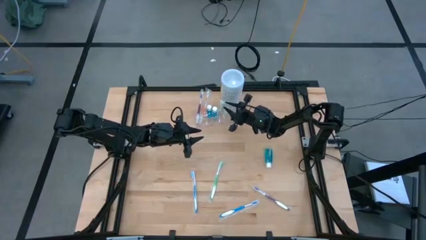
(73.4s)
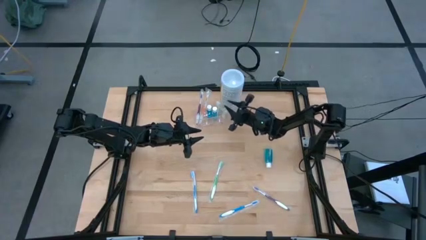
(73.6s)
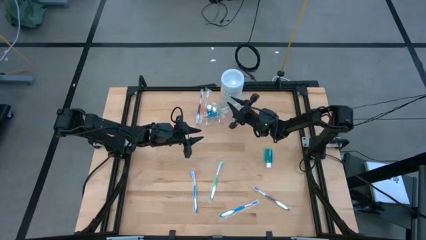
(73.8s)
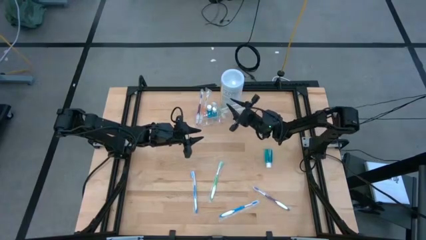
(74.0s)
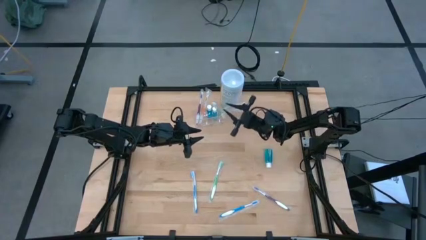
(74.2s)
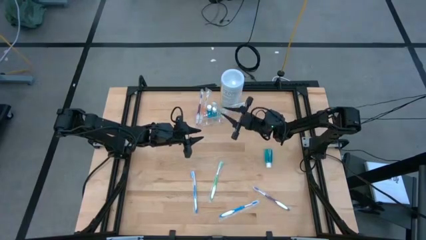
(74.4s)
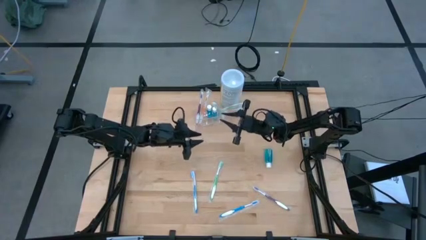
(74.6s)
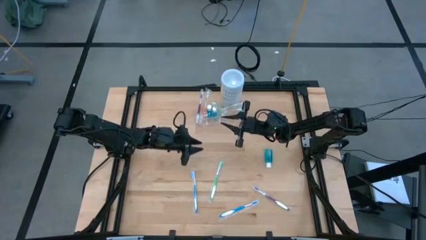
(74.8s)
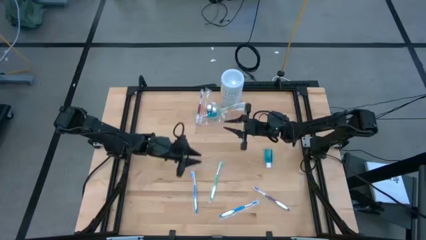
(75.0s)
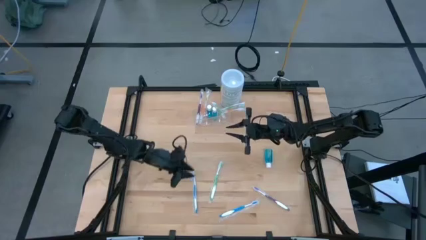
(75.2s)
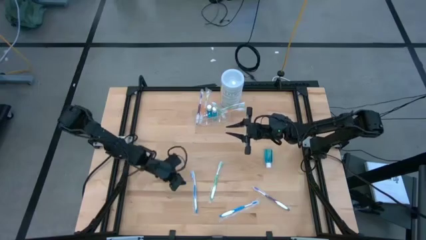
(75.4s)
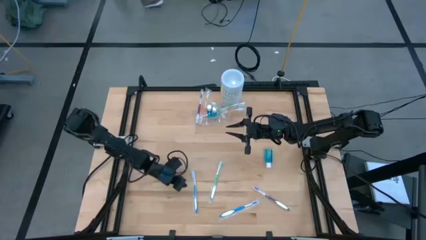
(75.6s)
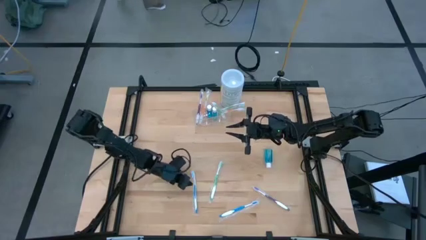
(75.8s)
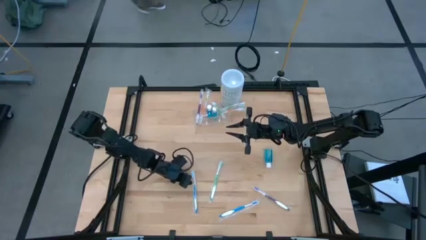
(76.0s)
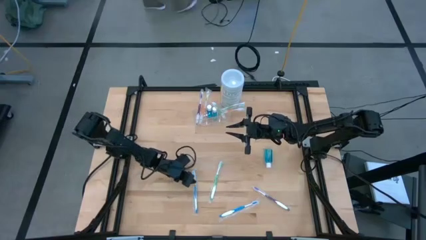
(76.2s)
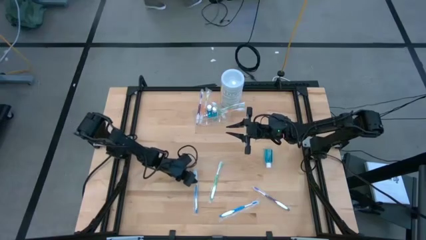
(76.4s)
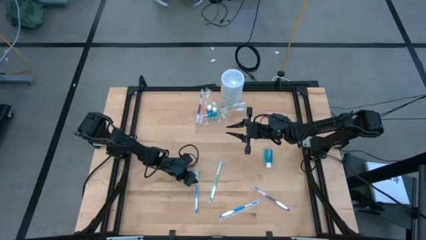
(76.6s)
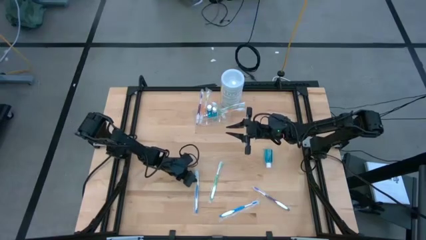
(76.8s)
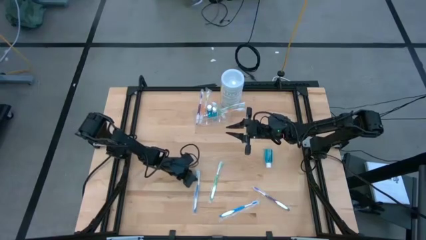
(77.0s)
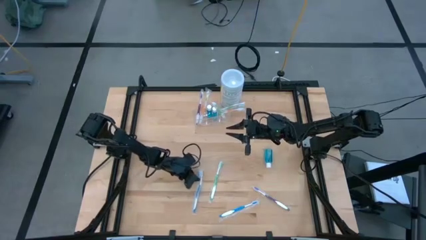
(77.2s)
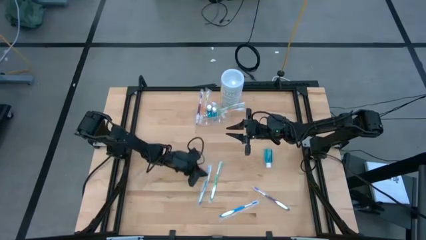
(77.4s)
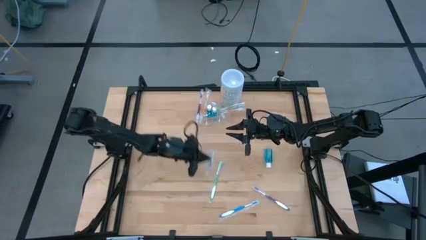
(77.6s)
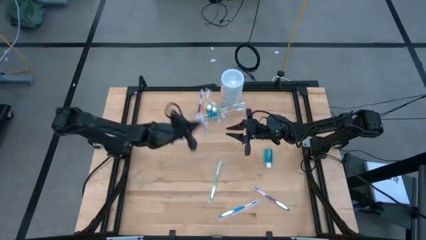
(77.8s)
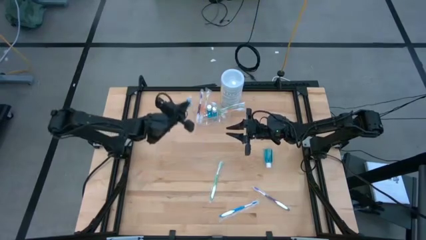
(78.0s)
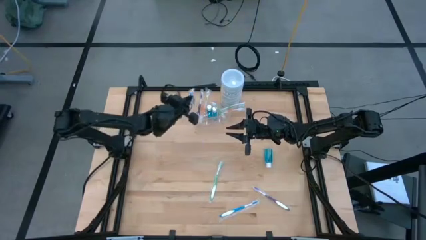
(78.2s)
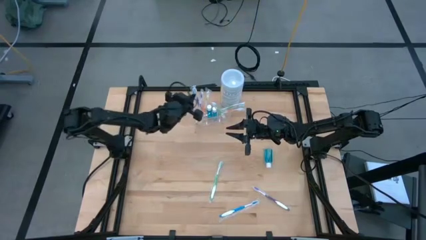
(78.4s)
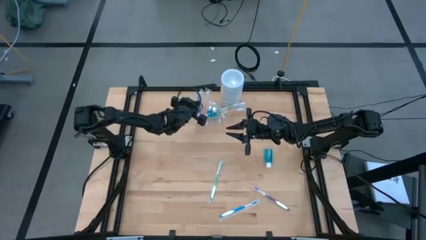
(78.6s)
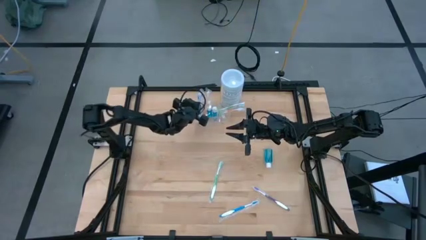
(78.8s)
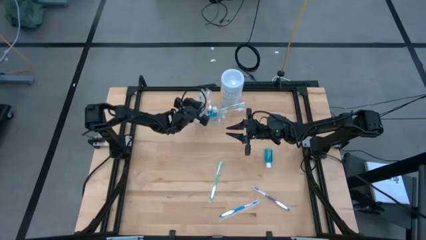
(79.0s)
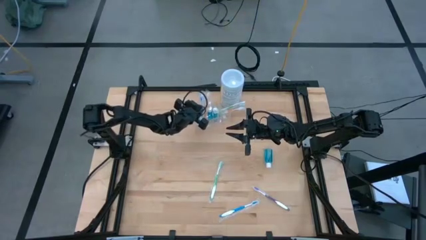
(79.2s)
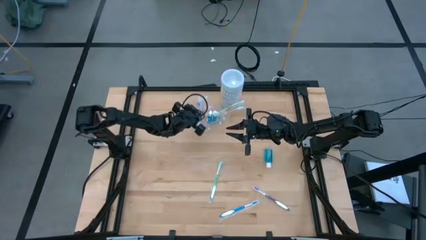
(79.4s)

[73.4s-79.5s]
Task: Pick & Place toothbrushing station
Put the left blue toothbrush into the transparent organizer

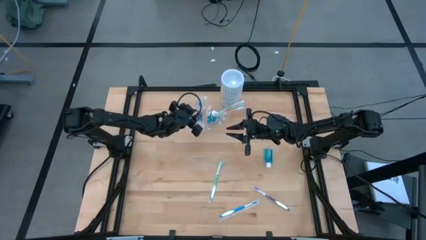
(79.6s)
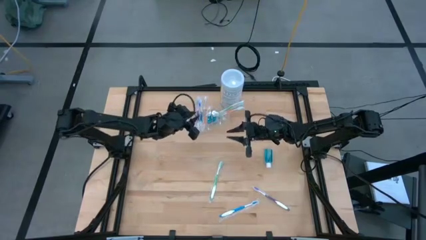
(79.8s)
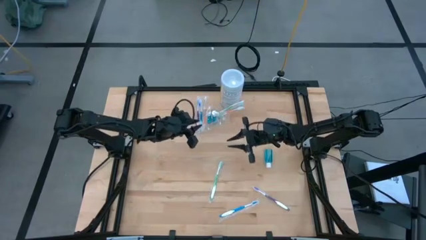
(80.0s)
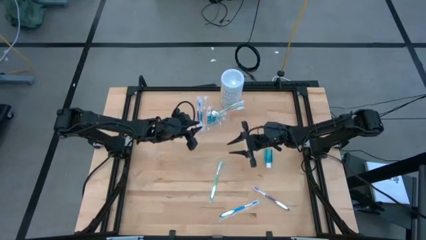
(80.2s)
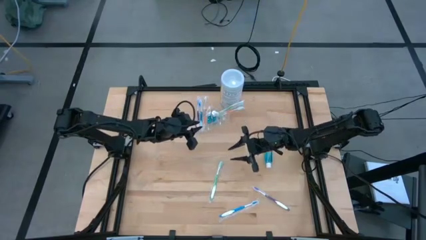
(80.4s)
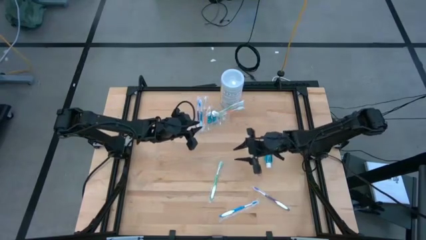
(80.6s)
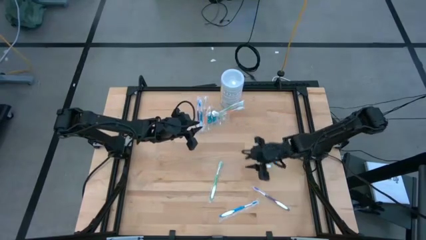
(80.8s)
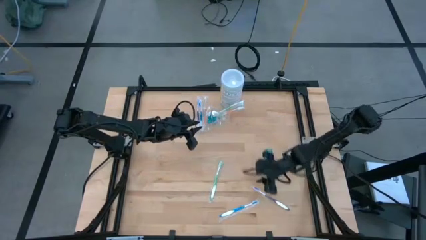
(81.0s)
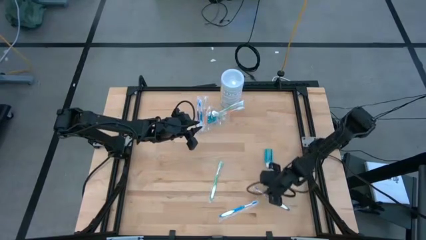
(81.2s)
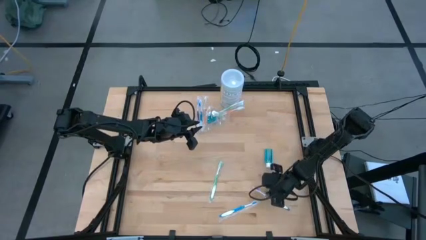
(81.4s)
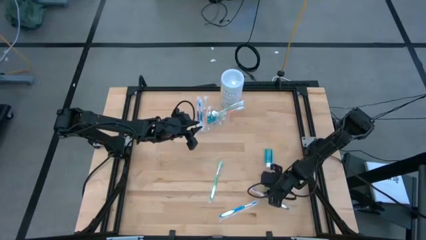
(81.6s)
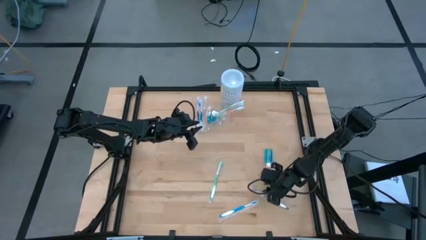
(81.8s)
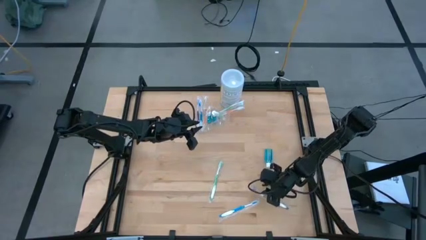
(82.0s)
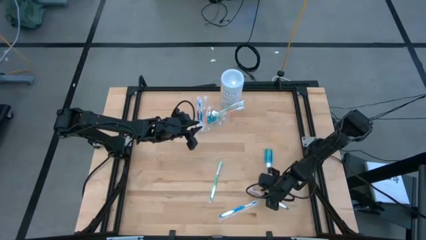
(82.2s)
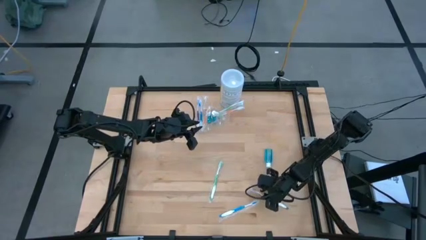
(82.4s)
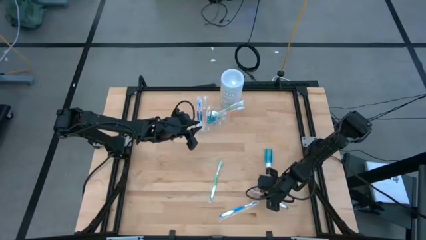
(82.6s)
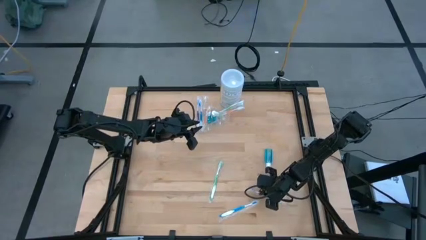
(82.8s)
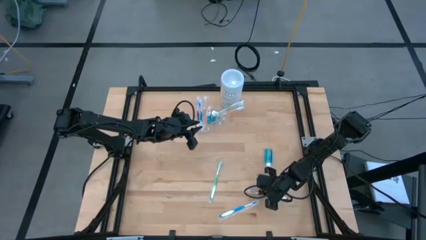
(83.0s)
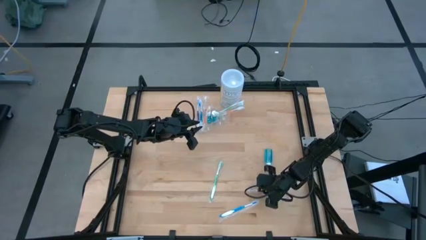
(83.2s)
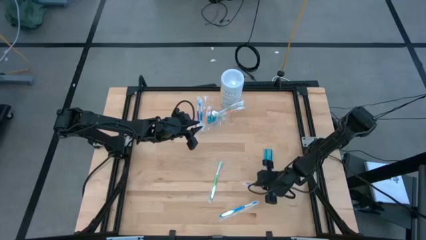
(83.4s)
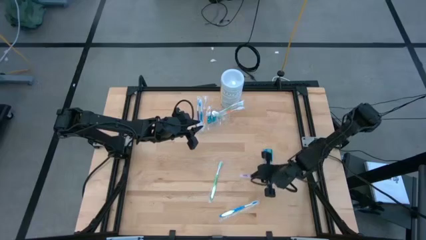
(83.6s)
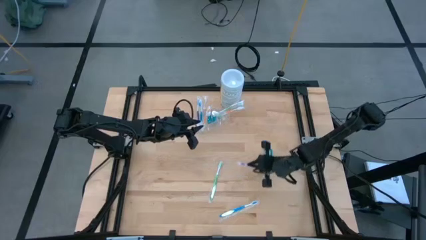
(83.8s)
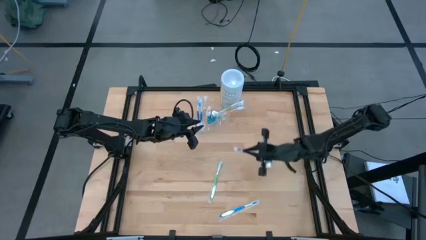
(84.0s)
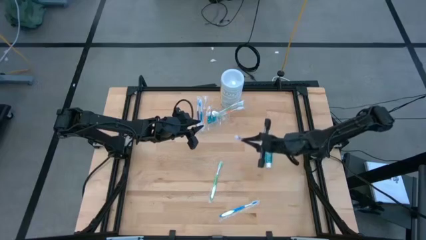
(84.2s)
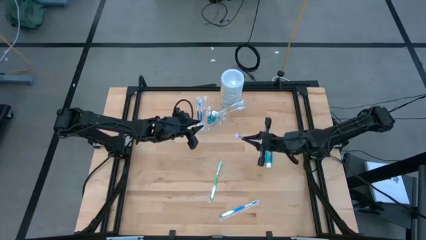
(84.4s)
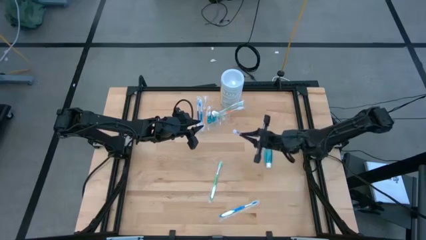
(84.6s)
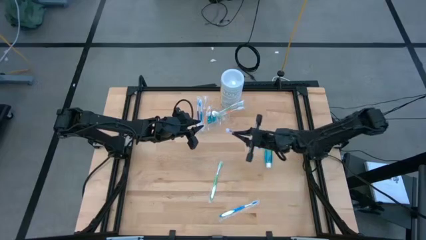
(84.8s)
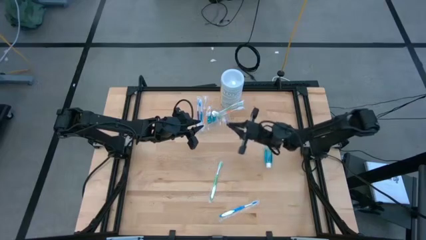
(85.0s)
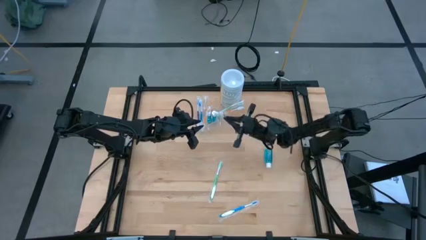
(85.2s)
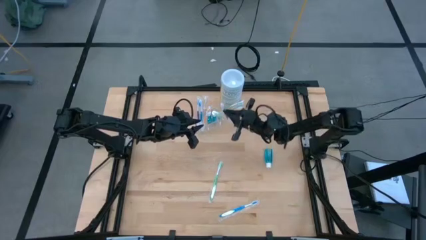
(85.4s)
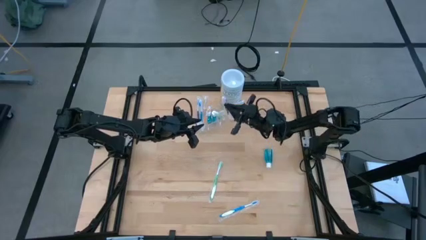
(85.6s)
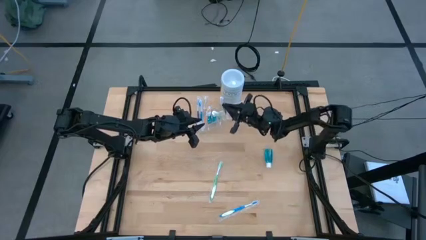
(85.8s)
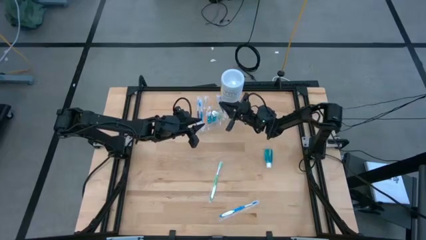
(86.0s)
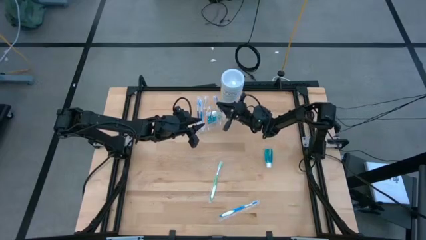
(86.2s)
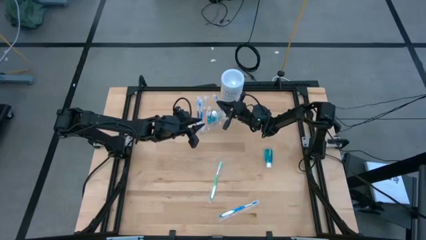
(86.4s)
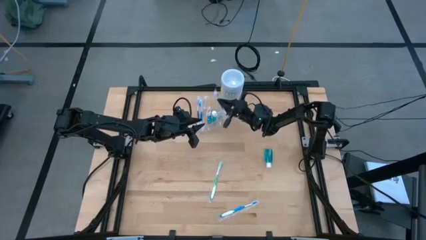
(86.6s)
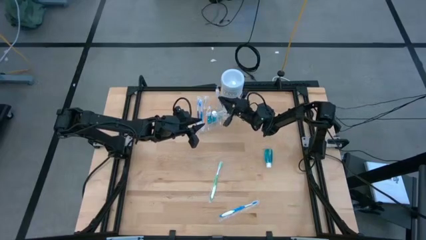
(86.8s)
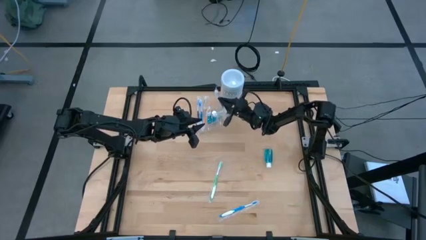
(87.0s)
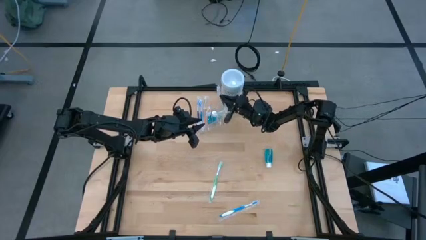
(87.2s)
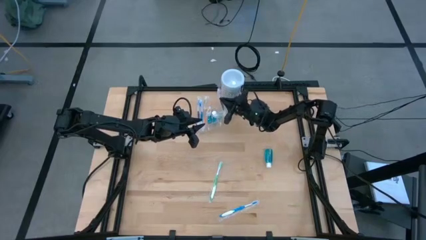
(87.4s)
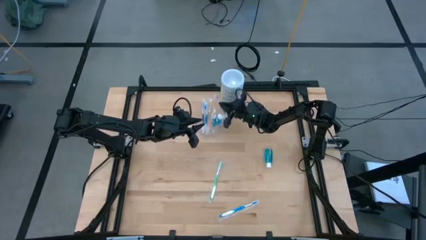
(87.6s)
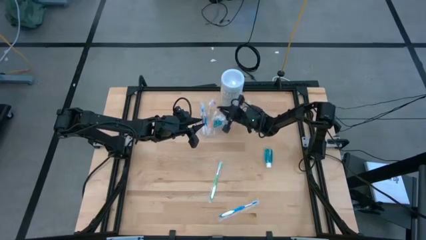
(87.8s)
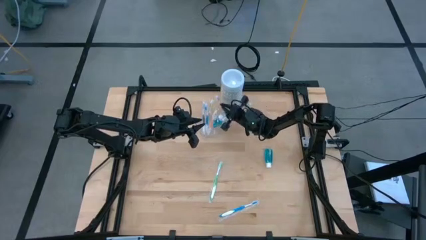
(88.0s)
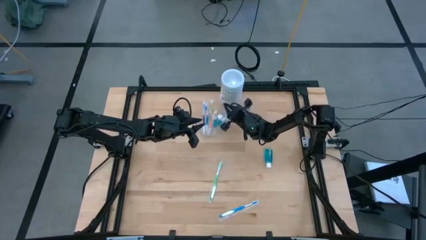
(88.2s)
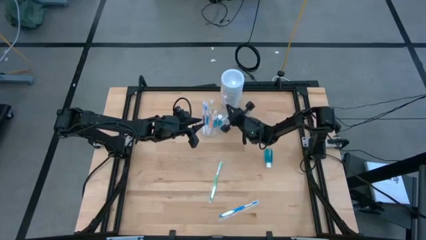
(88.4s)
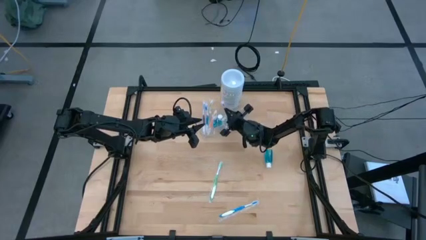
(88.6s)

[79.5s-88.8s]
Put the purple toothbrush into the transparent organizer

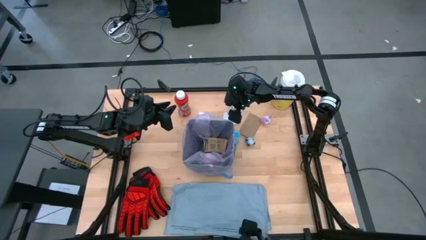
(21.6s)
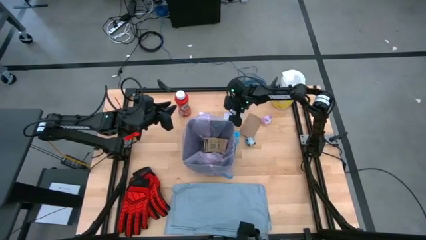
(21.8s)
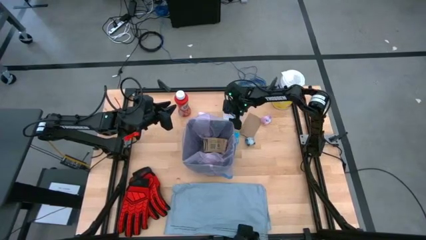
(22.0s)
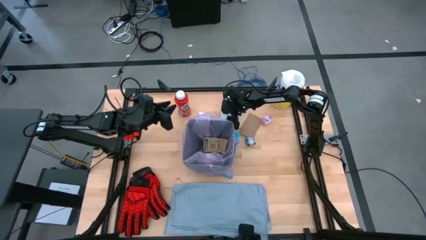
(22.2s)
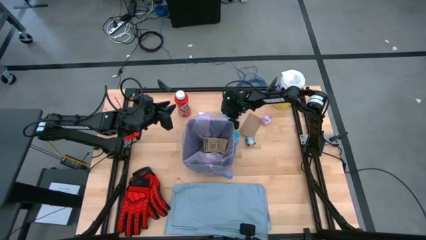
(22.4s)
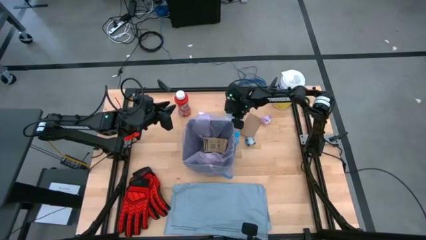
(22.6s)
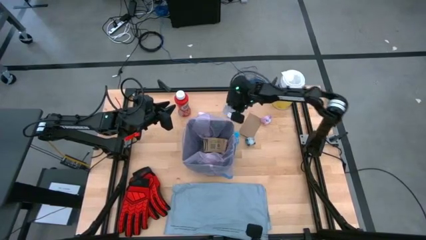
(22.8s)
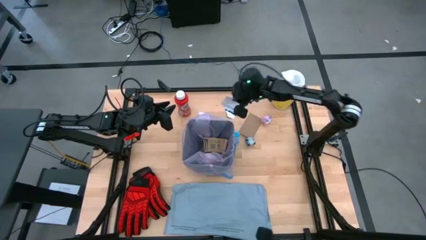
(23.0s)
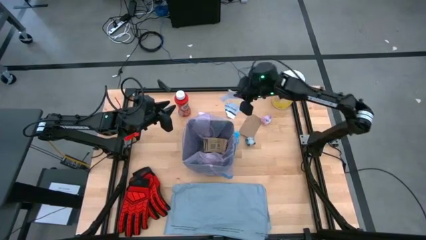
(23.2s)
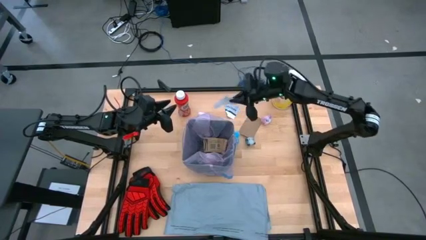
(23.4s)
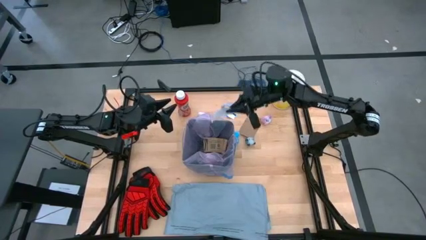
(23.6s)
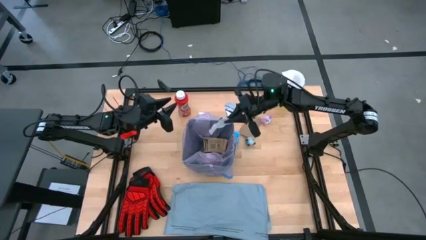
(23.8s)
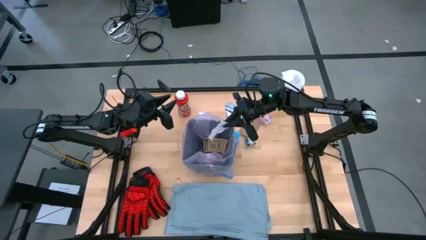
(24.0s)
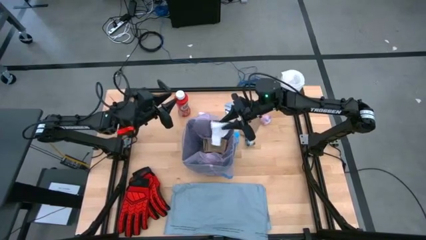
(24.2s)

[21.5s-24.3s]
Task: place trash/remove bag and relplace
Put the white paper material into the trash bin
